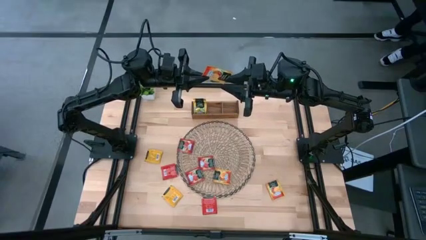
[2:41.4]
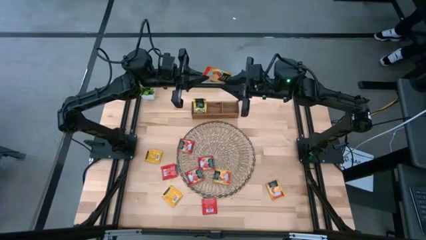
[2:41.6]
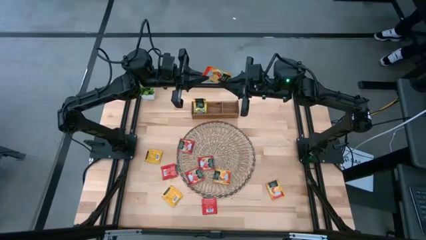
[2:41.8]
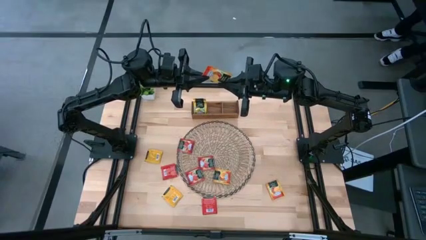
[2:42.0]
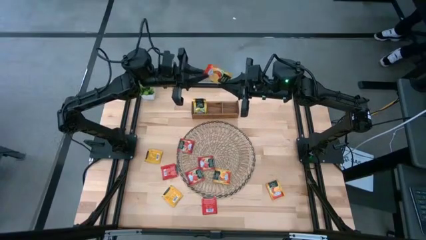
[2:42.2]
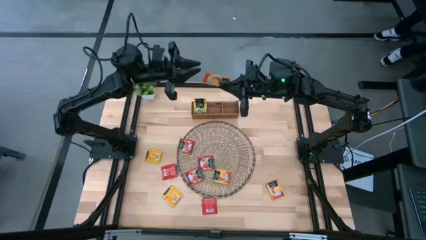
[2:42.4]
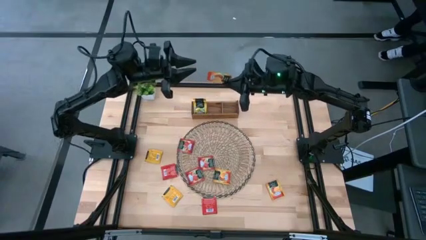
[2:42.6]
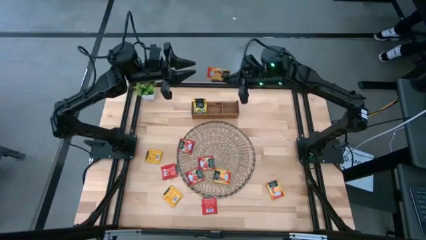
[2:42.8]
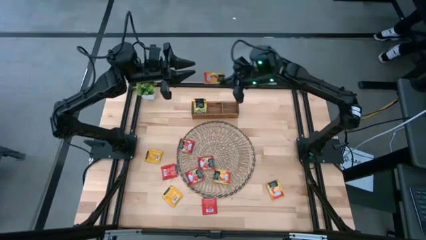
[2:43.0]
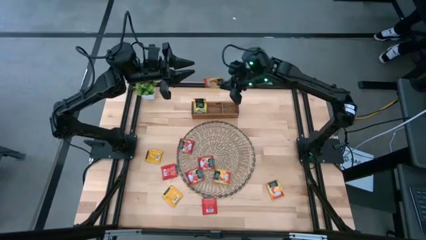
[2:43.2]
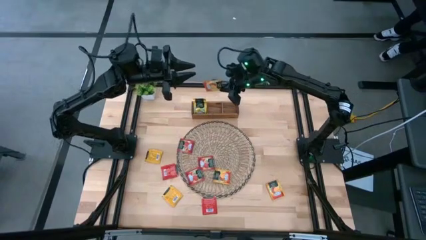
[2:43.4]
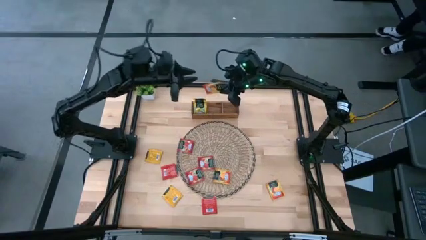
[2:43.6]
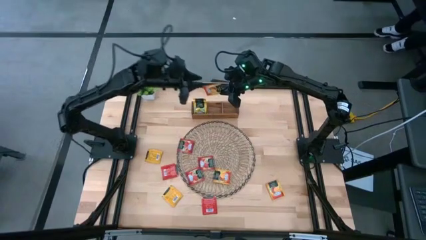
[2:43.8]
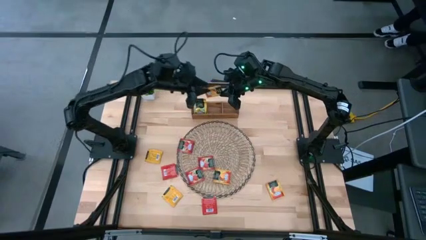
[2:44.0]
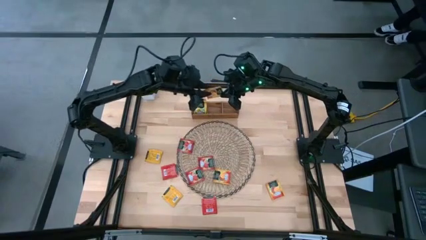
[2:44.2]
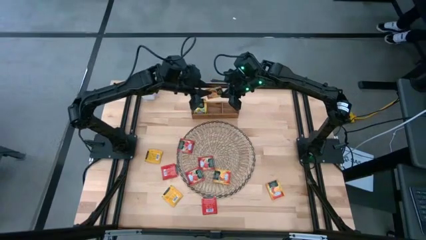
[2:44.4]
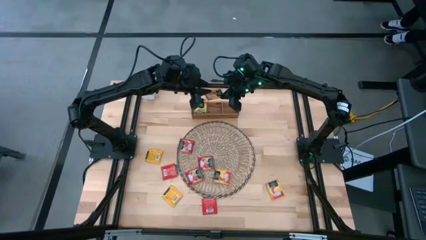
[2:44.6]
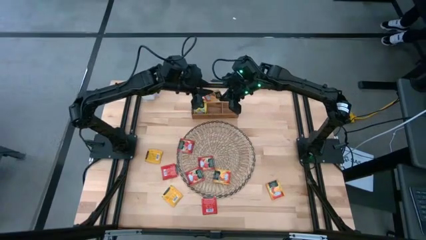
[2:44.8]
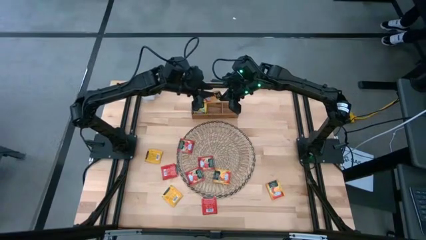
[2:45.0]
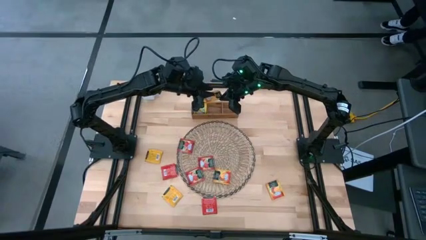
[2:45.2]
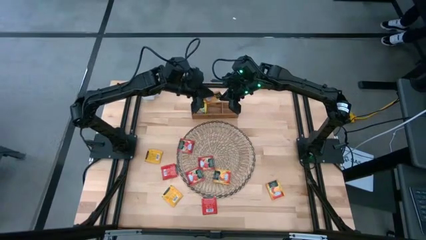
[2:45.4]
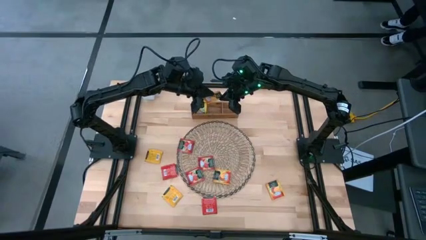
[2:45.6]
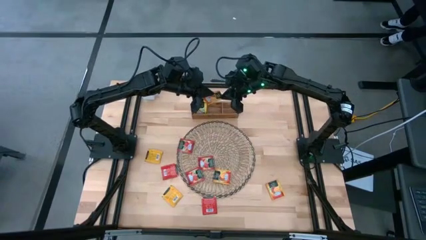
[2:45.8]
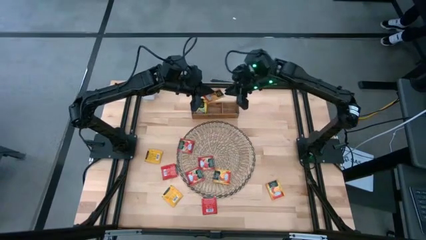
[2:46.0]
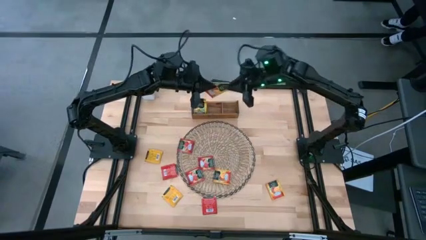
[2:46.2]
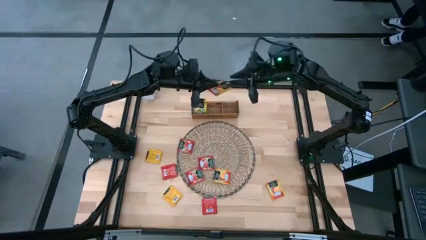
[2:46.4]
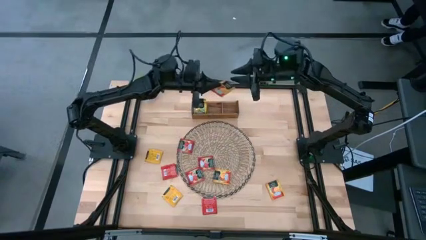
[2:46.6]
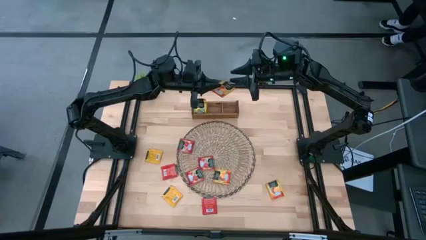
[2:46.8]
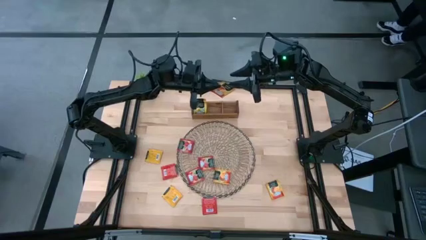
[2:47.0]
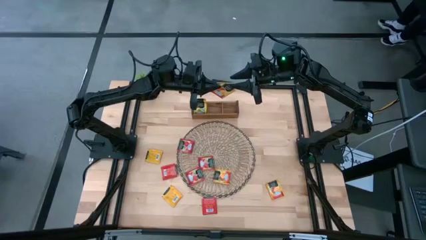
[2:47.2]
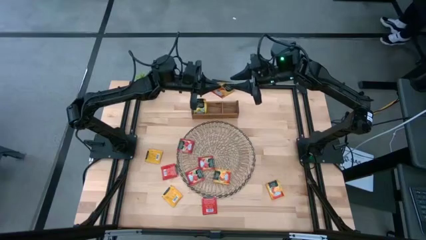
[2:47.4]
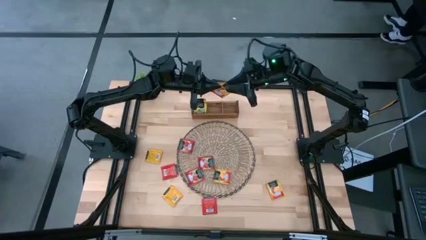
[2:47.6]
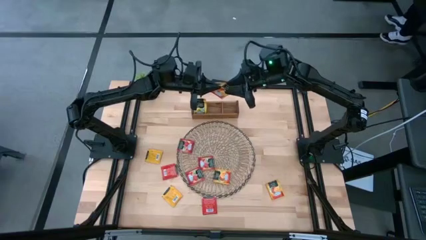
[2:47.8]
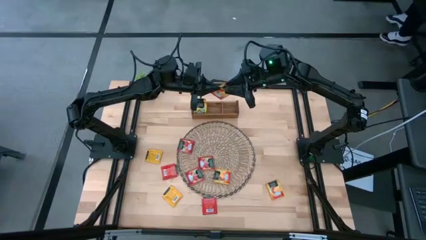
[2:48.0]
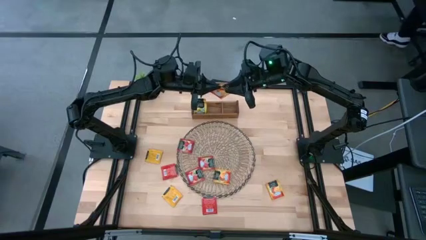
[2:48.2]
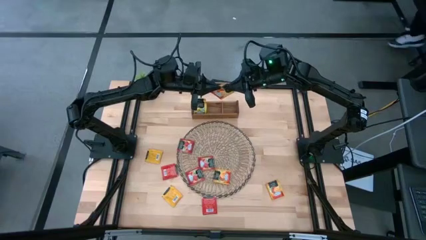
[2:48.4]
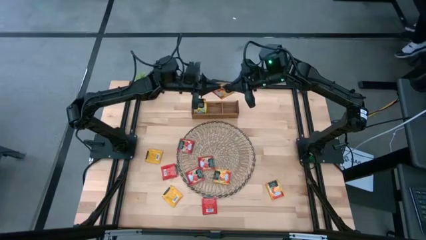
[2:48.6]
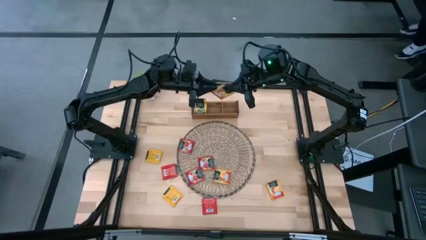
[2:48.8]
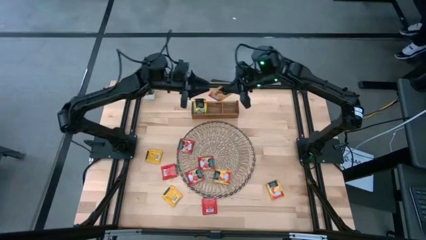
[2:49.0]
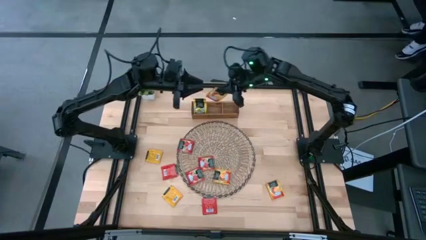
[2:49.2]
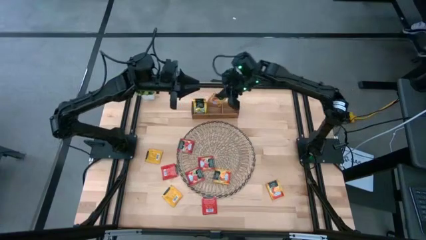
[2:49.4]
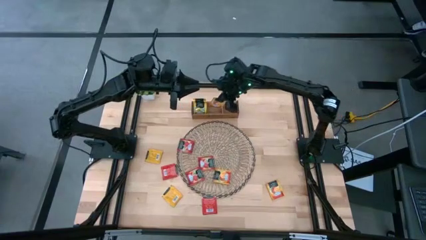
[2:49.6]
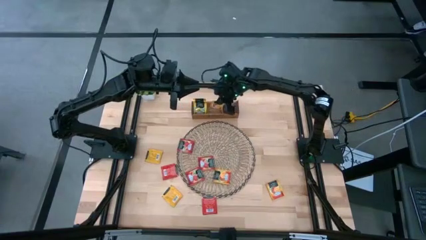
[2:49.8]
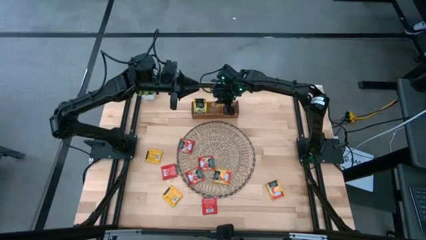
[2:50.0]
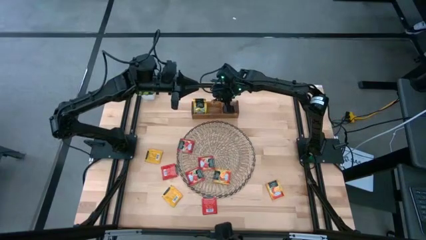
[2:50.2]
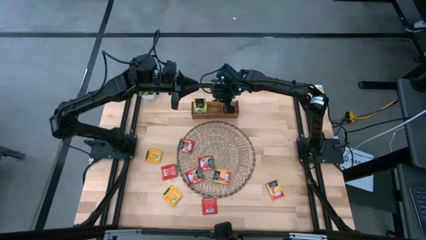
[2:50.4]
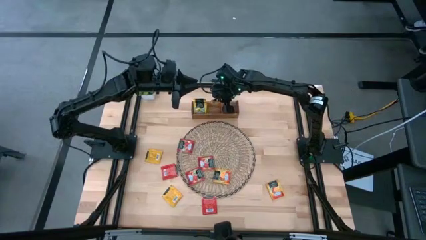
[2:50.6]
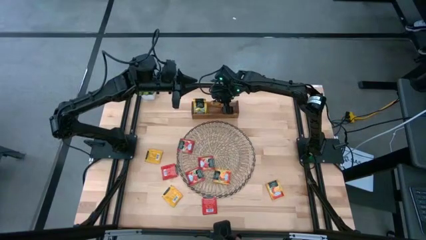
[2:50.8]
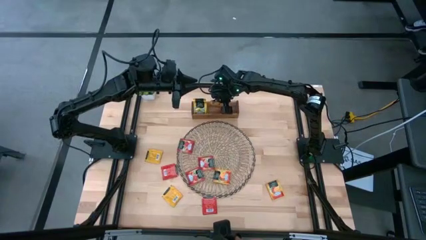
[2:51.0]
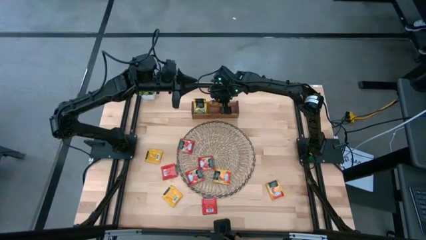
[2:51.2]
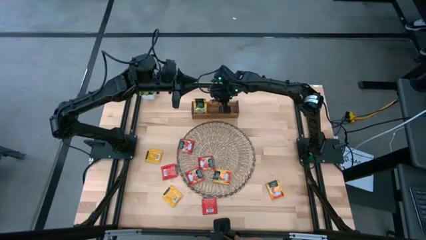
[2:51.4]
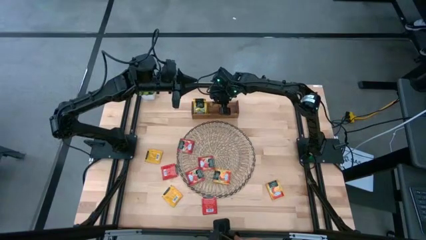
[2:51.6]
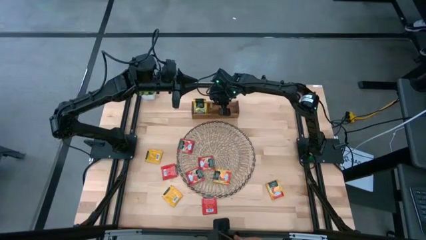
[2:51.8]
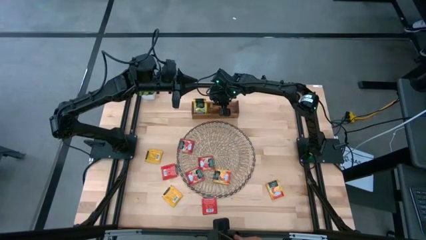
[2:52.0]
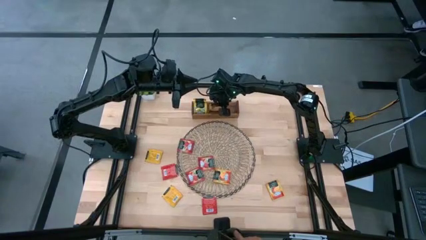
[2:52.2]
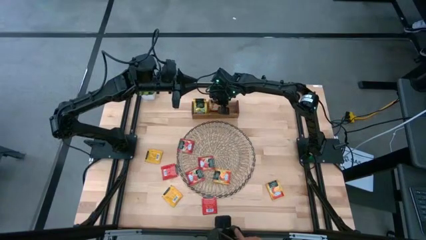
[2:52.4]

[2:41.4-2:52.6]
Task: Pick & Place Tea
Put the orange tea bag into the middle of the wooden organizer
